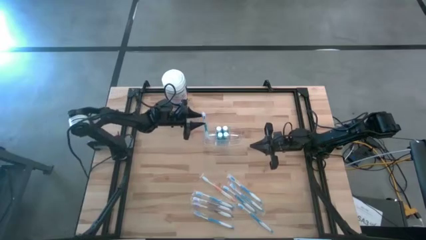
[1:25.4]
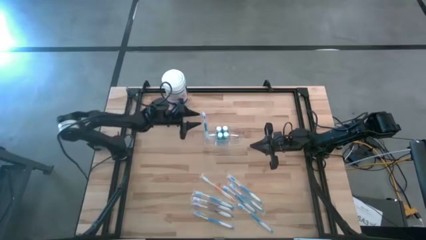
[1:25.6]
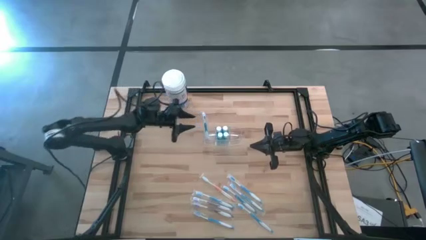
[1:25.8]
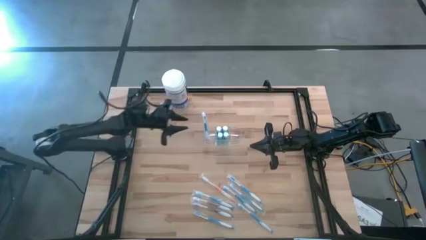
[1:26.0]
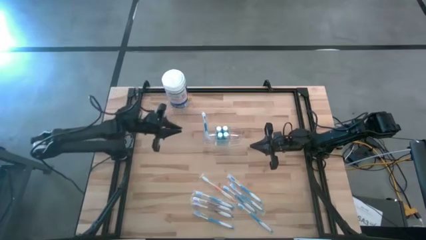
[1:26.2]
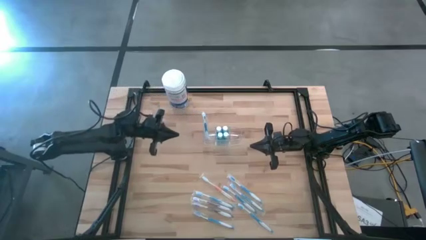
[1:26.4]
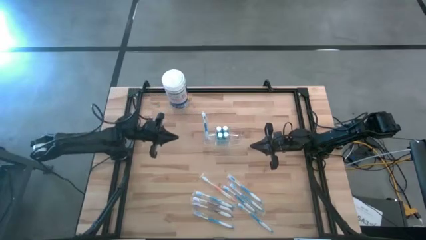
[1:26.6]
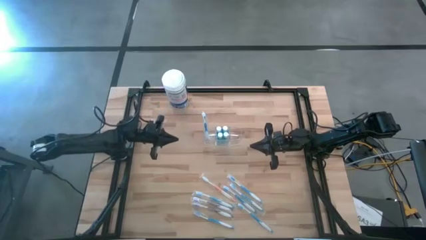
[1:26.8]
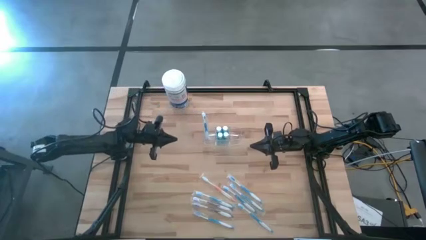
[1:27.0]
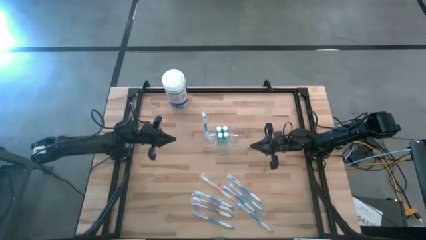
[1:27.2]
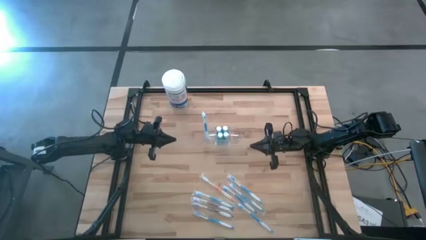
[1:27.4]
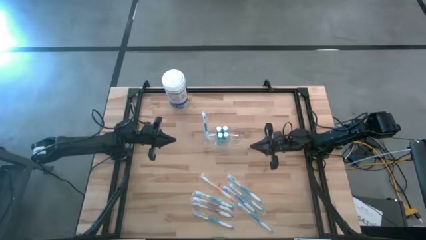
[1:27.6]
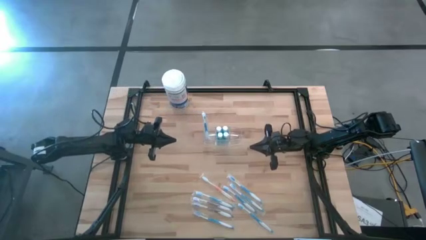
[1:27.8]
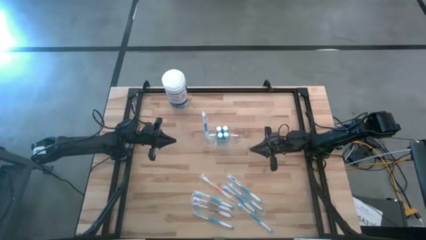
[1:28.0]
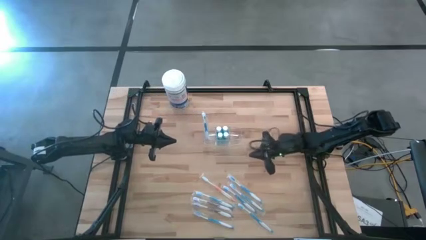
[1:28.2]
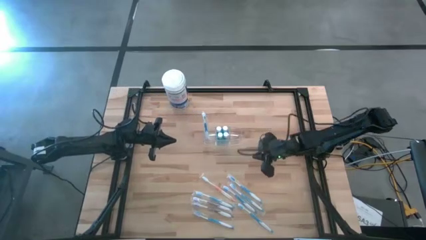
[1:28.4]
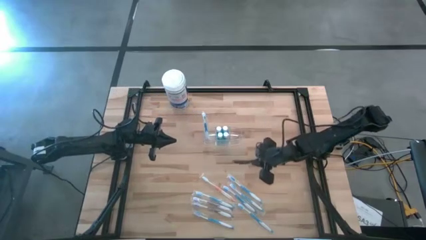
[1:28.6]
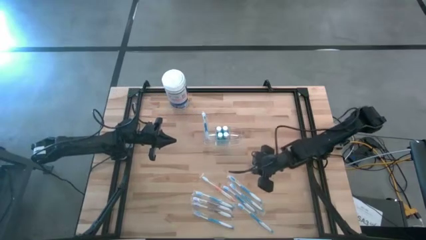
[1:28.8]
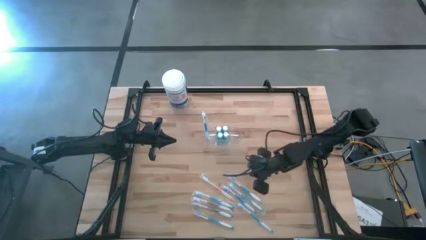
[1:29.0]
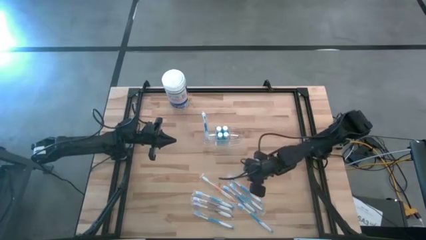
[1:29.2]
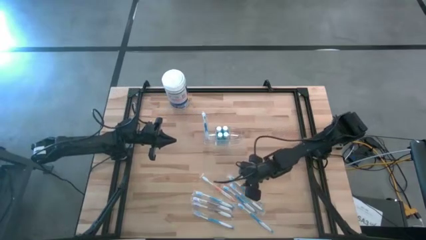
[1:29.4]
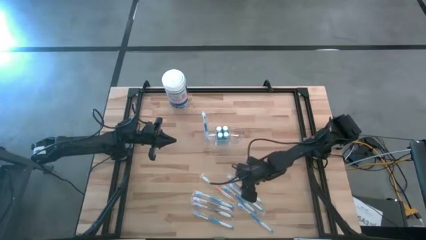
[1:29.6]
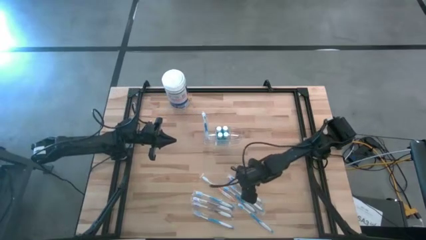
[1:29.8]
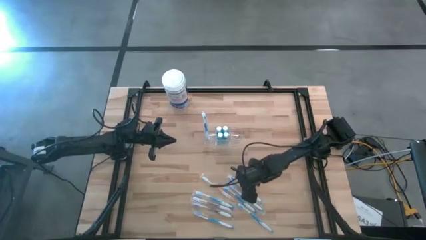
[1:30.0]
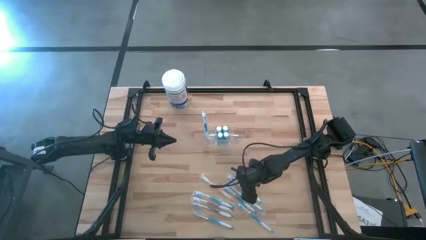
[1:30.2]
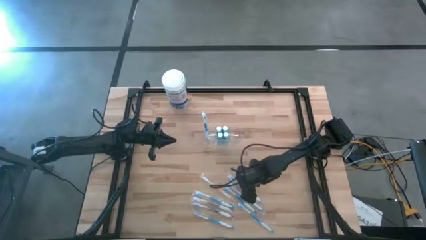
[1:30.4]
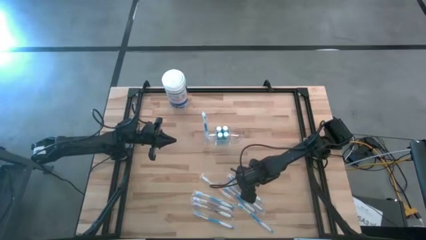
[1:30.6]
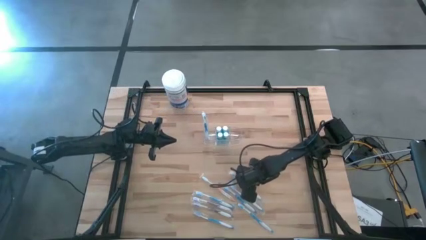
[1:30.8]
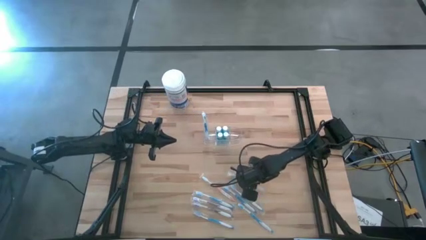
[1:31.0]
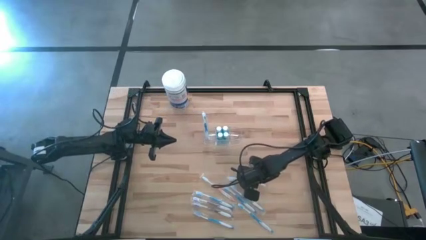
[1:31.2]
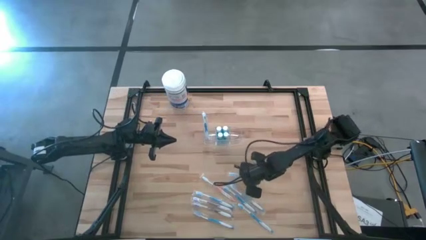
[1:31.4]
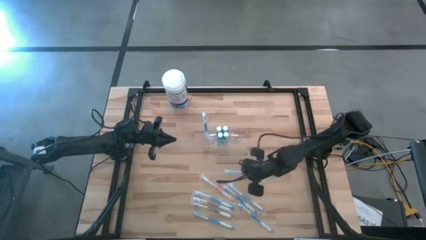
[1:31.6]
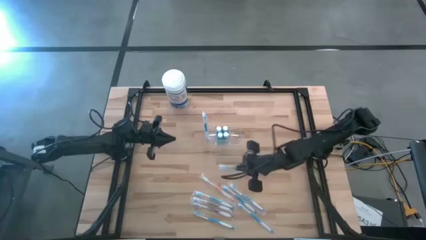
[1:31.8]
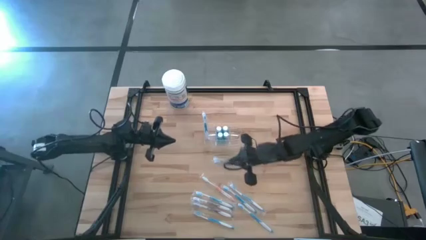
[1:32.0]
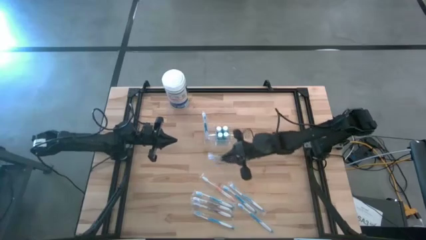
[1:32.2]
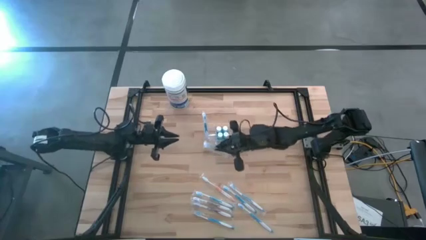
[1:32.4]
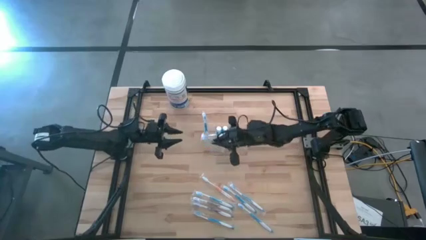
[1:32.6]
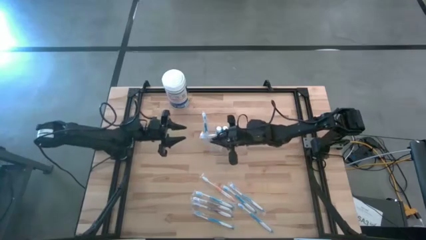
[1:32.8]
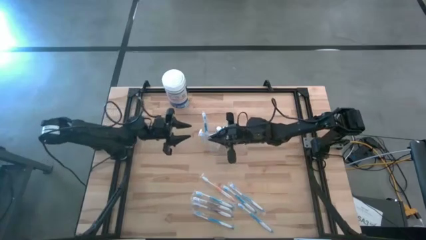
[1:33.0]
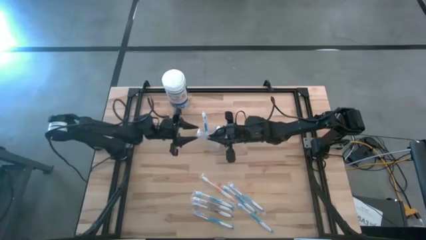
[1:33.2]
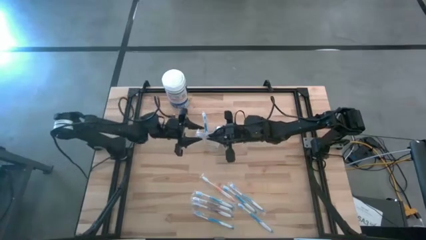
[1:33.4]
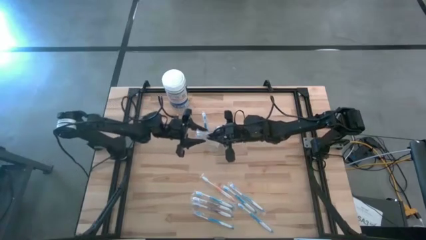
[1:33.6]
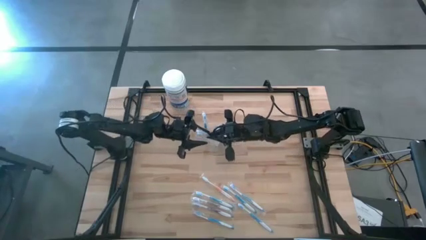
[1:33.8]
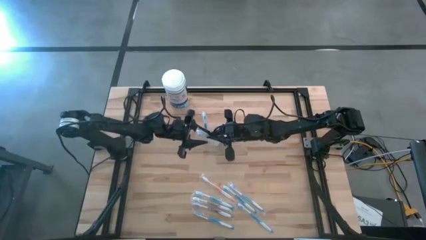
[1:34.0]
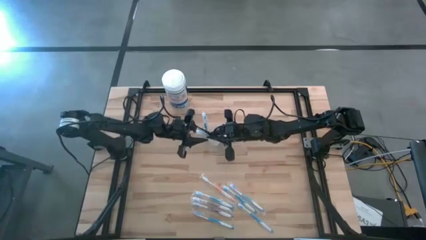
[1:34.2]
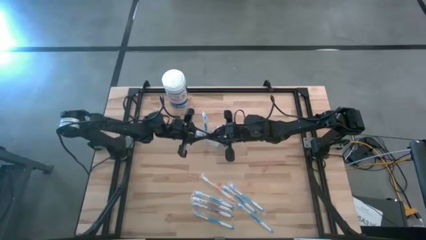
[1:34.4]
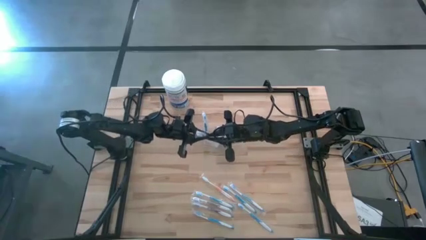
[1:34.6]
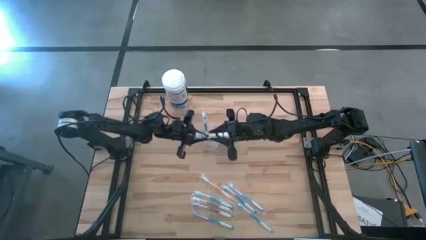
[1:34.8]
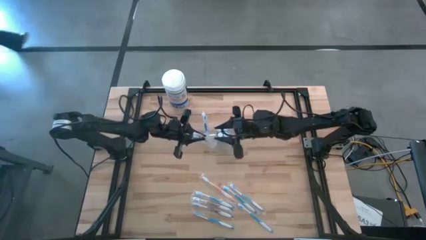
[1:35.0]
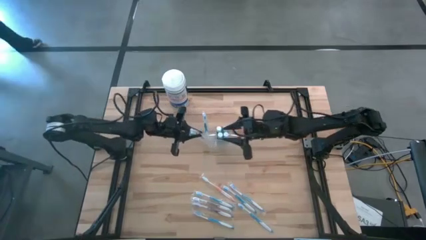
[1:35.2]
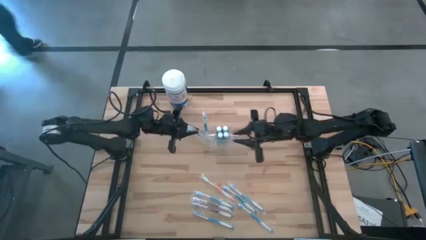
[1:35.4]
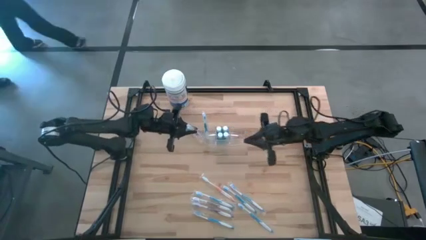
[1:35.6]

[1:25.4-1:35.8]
Task: Pick & Place toothbrushing station
Put the blue toothbrush in the transparent organizer

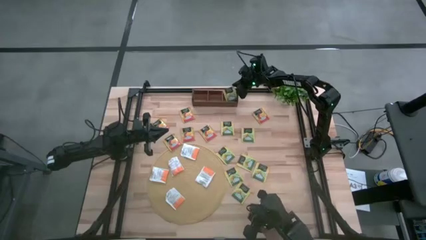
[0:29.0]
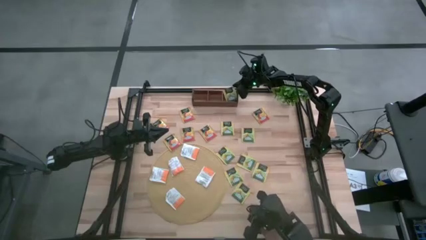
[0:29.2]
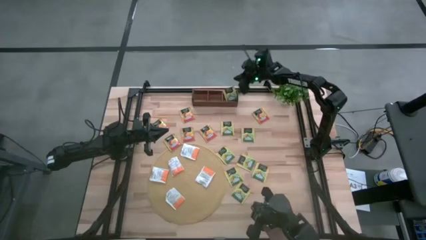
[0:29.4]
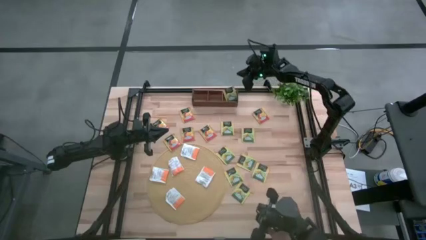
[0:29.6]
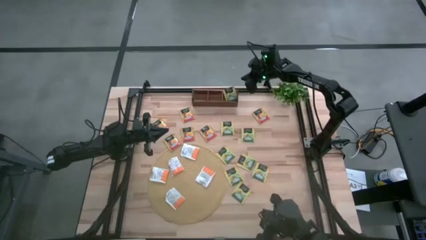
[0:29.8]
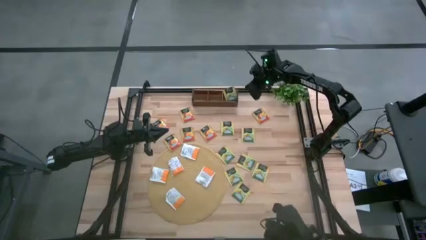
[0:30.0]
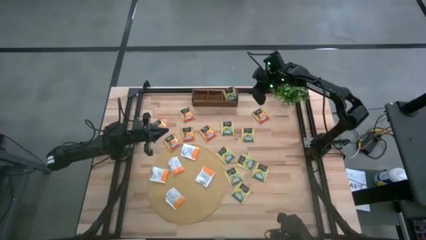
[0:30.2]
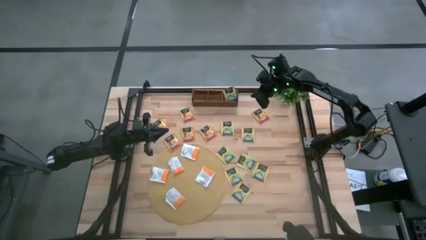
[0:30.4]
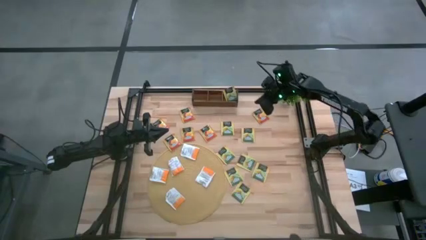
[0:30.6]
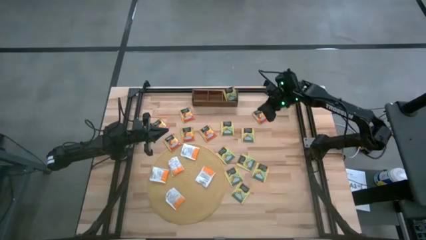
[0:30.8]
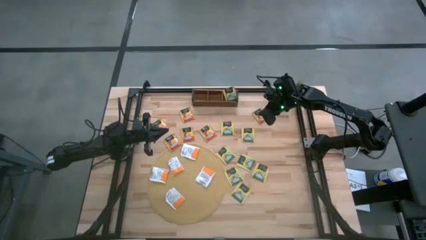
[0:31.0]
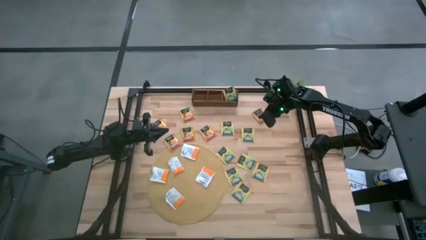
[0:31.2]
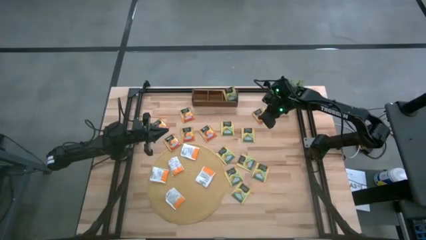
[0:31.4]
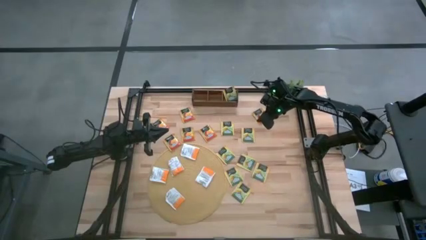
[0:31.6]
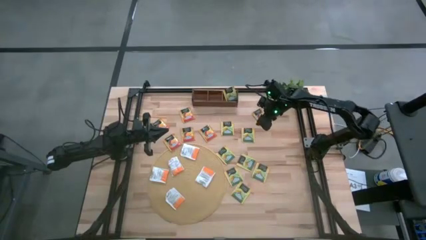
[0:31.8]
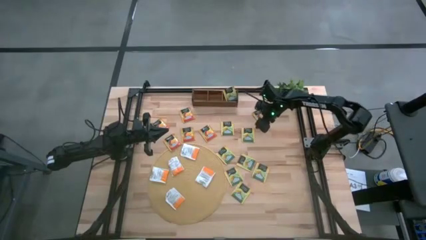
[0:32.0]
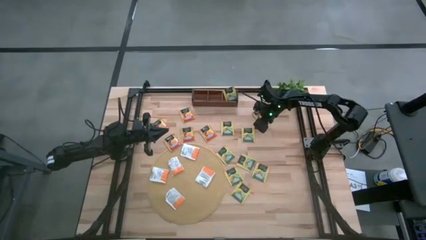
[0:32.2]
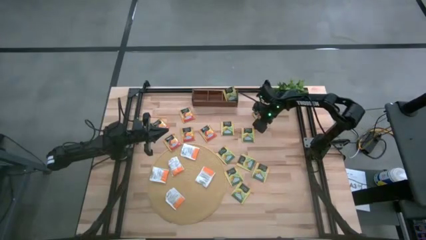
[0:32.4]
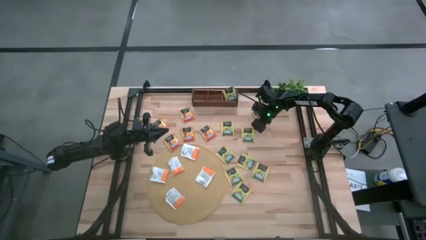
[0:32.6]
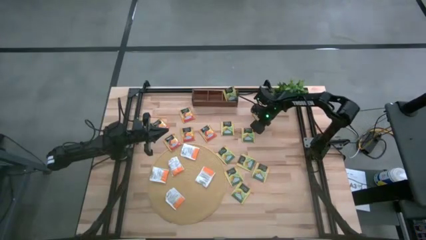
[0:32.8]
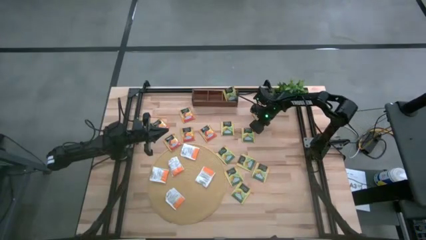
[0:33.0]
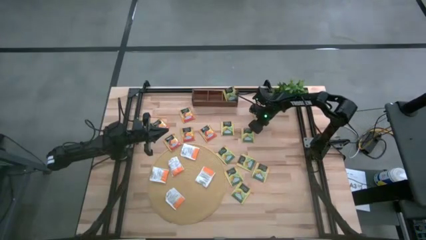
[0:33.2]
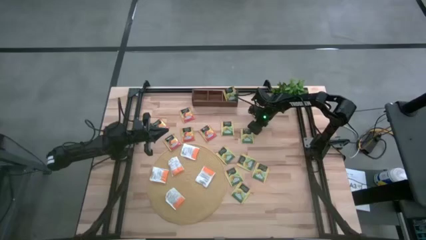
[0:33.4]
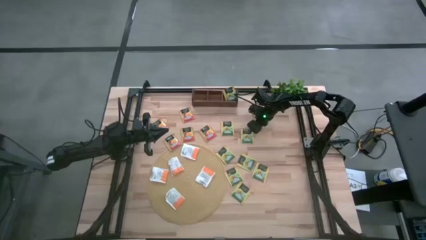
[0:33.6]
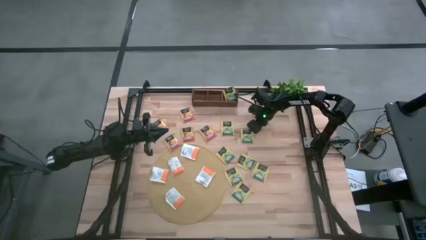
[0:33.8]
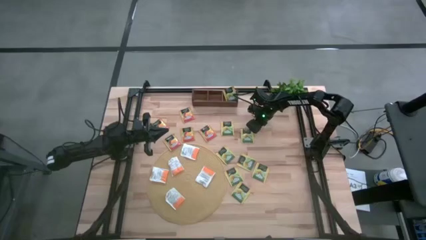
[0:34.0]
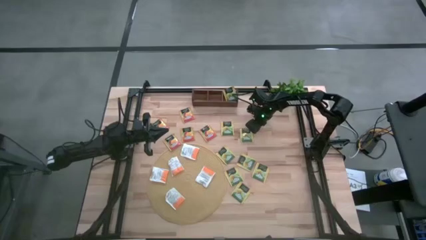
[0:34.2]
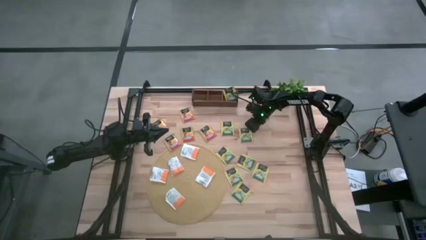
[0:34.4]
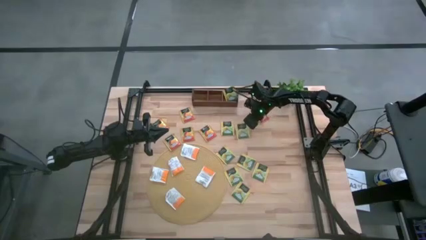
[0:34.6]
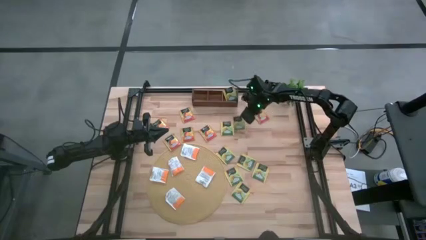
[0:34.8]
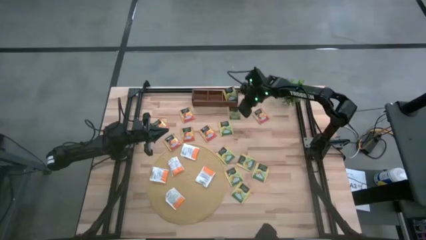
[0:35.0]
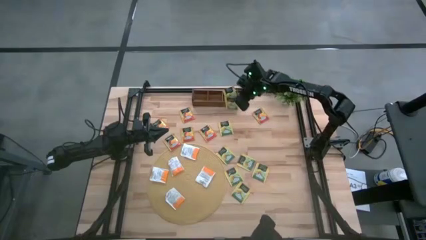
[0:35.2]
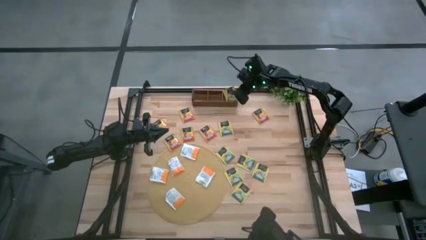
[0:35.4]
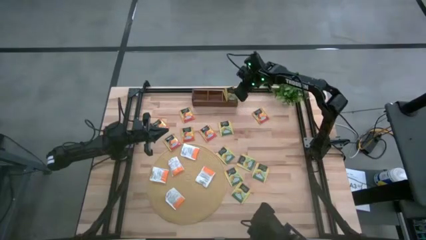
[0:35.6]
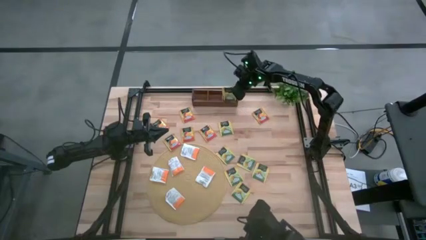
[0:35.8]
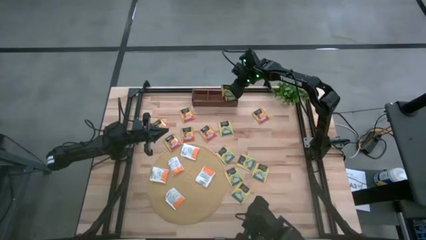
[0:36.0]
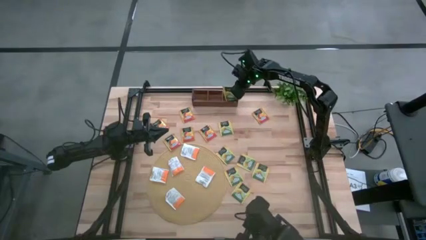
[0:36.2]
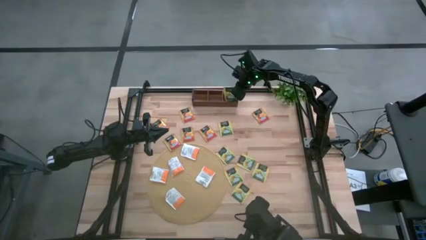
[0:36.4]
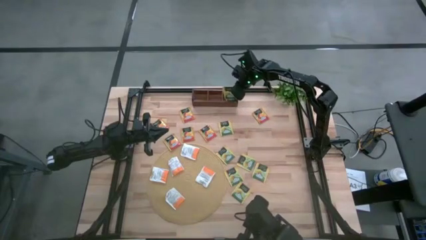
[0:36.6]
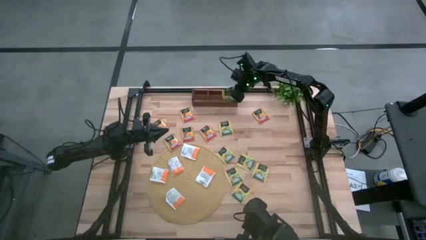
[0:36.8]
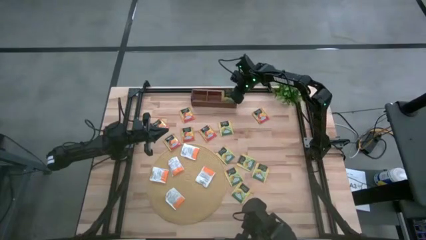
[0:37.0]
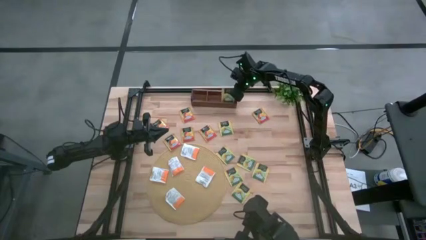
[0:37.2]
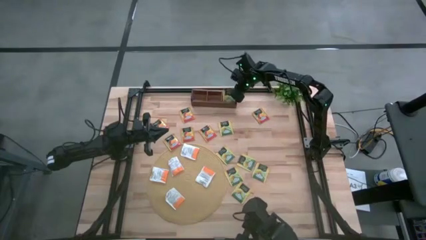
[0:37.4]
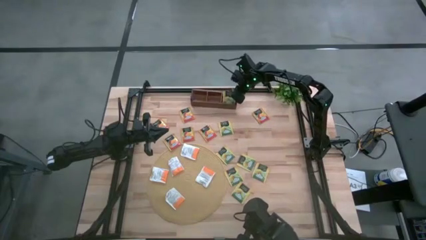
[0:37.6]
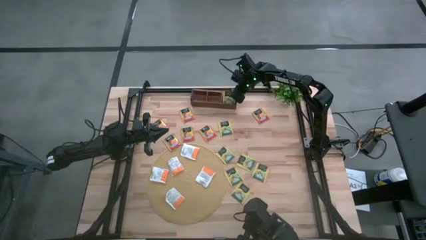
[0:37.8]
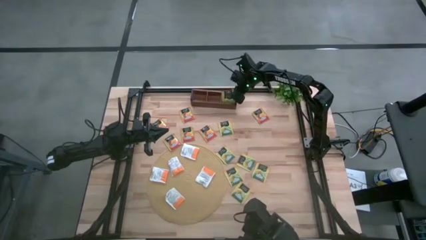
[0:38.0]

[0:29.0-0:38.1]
Task: Pick & Place Tea
Put the green tea bag into the right slot of the wooden organizer
